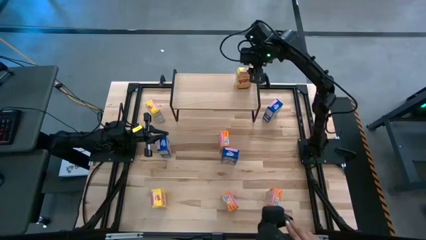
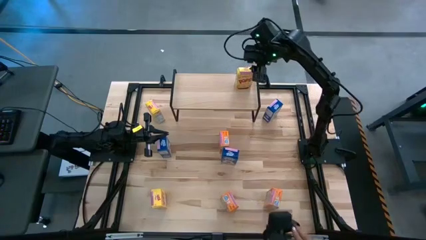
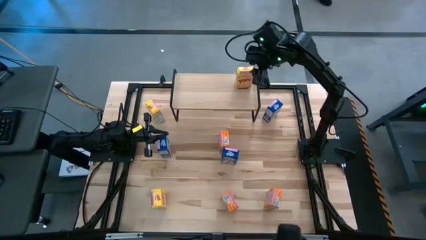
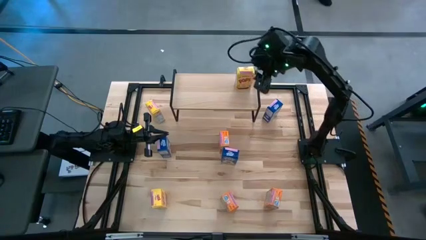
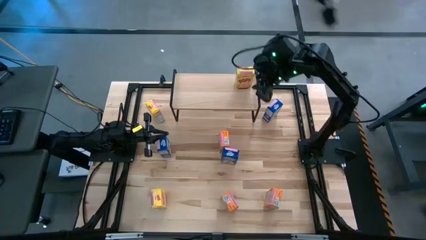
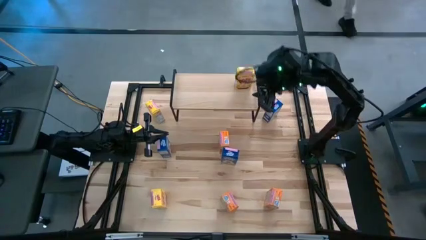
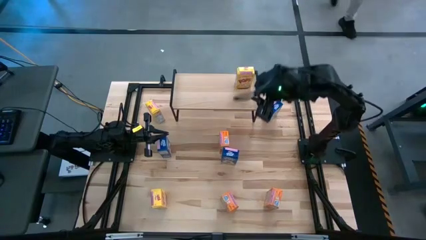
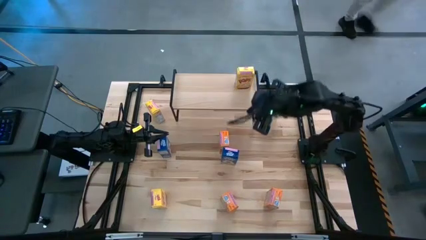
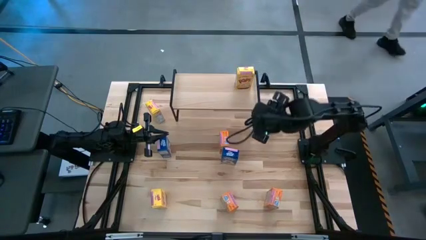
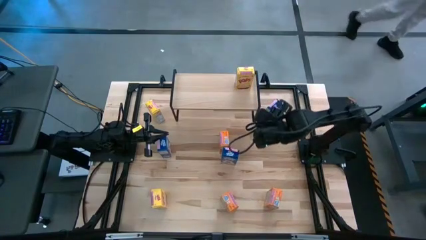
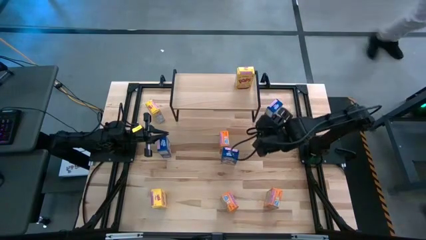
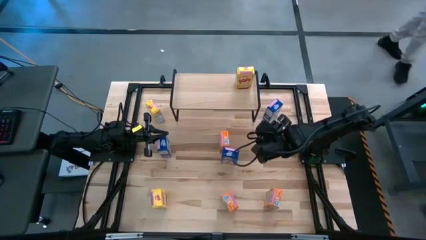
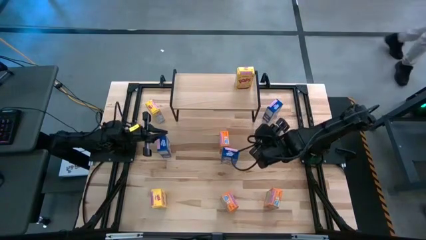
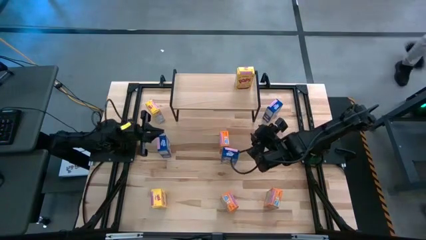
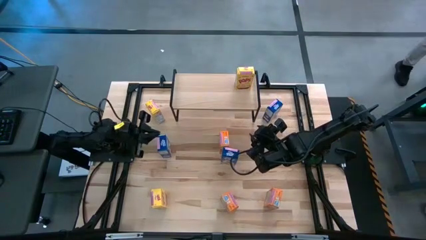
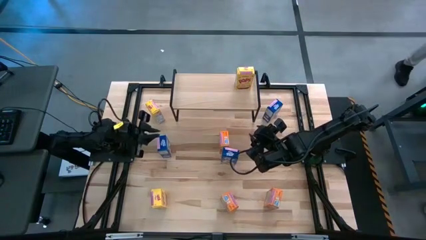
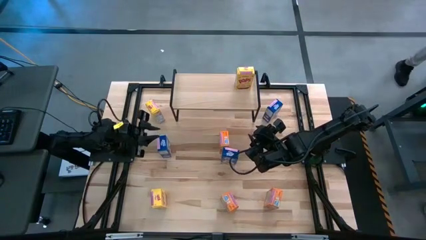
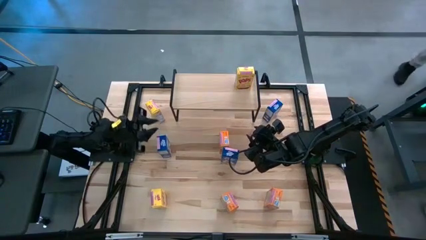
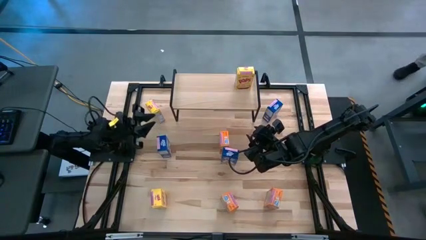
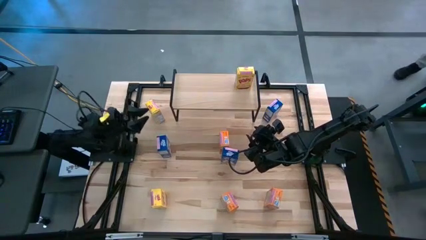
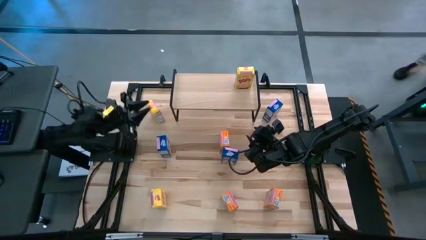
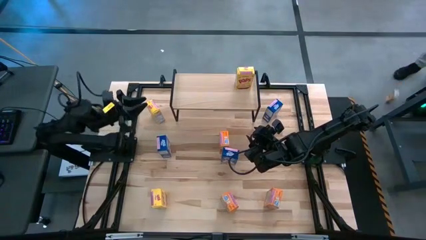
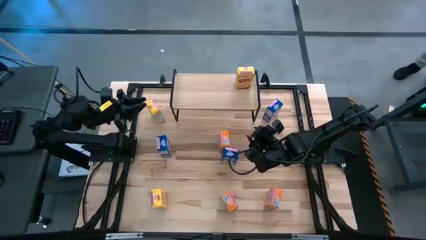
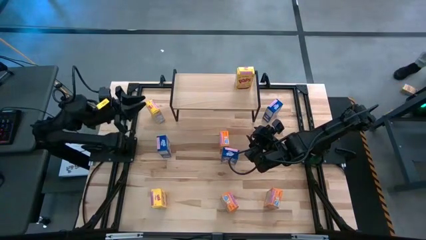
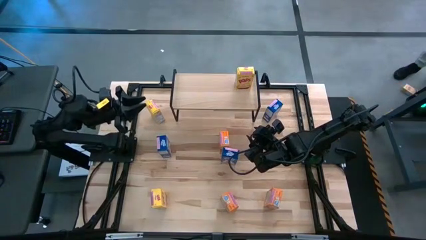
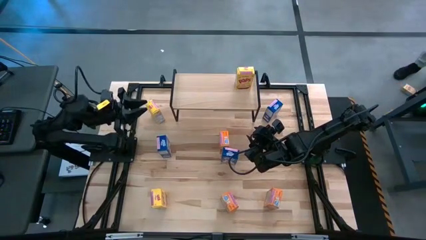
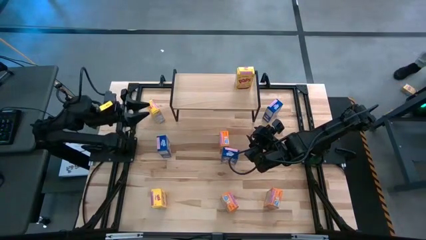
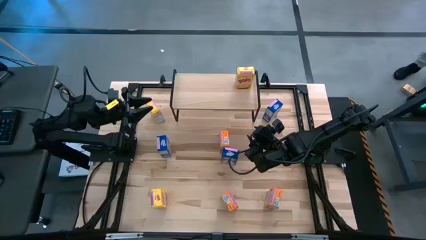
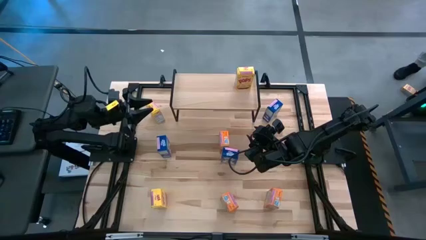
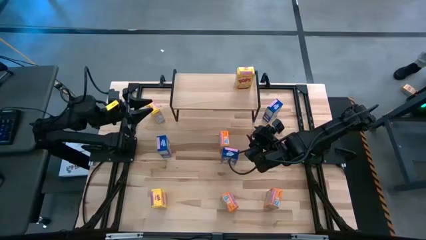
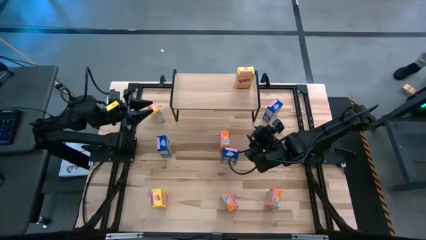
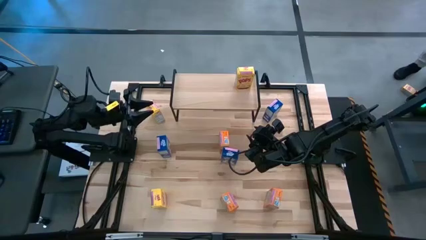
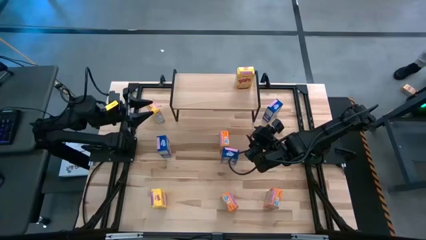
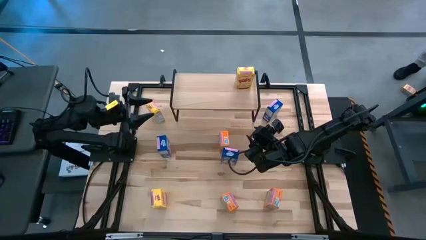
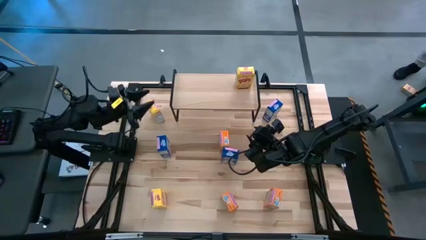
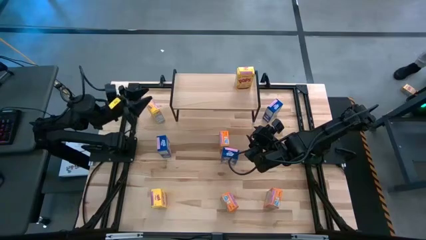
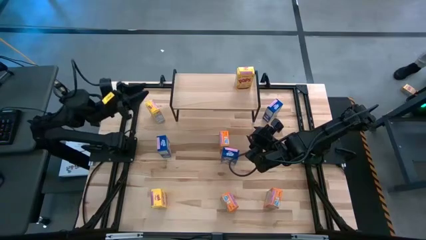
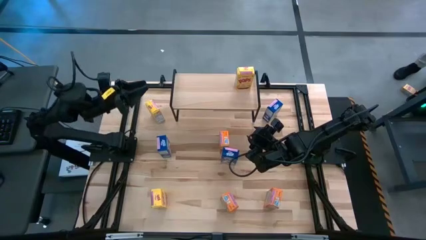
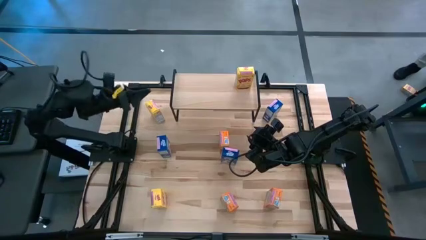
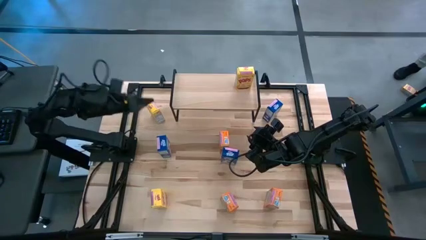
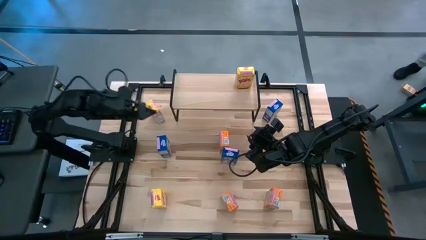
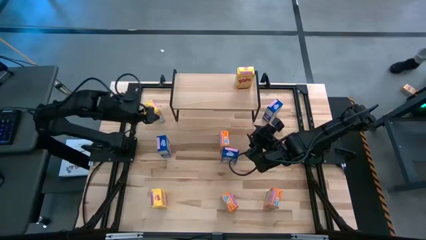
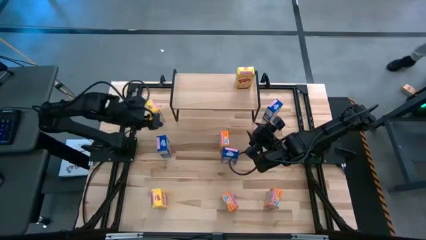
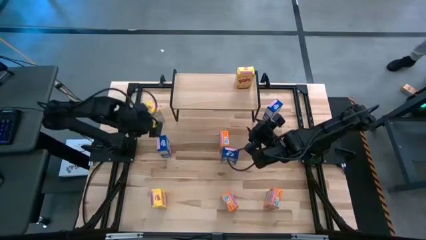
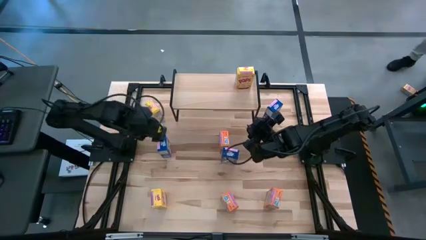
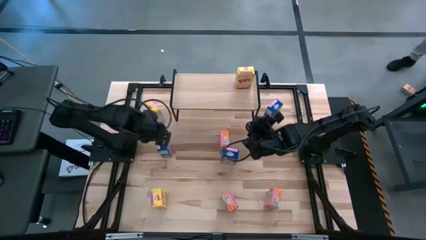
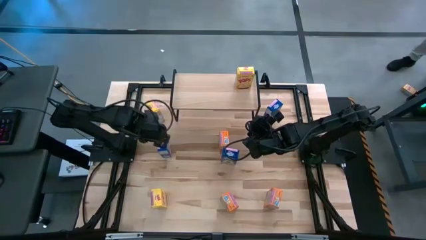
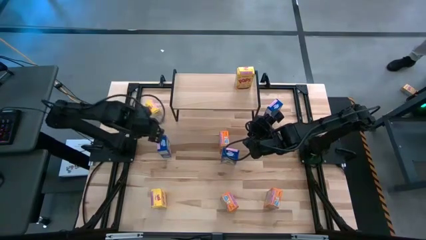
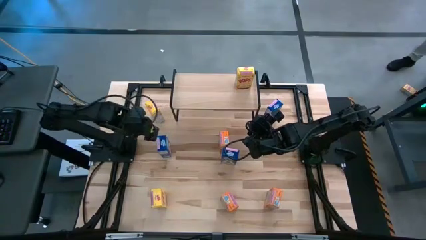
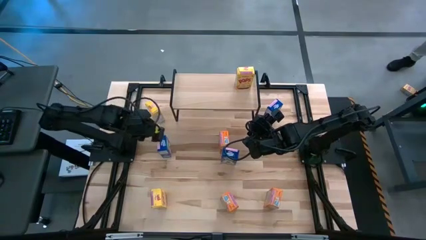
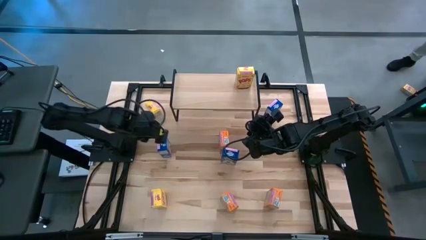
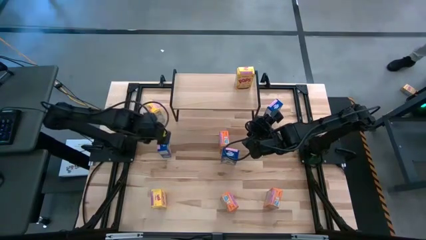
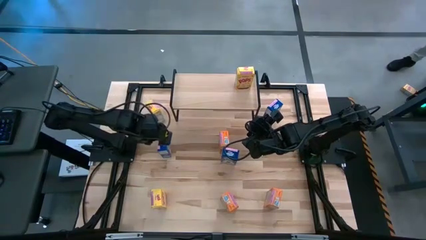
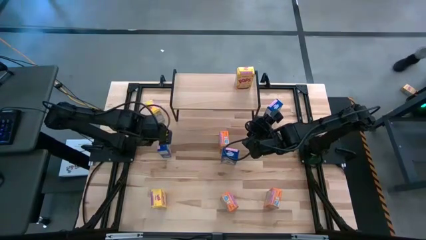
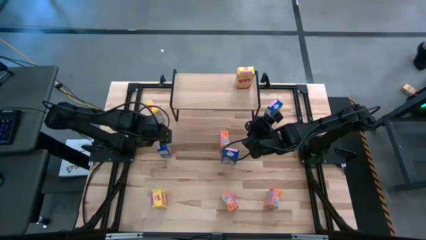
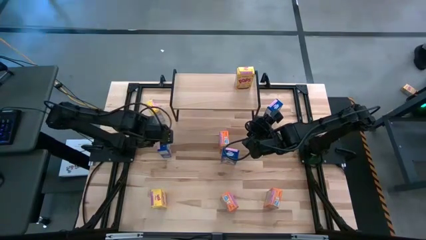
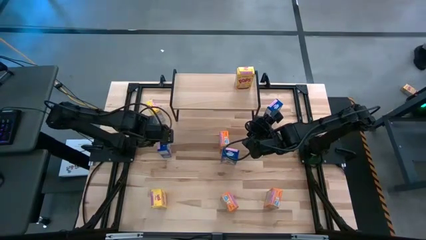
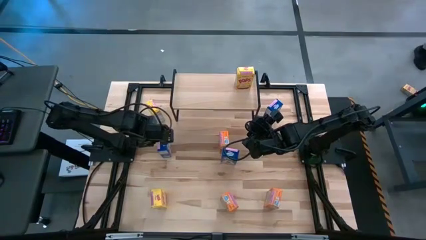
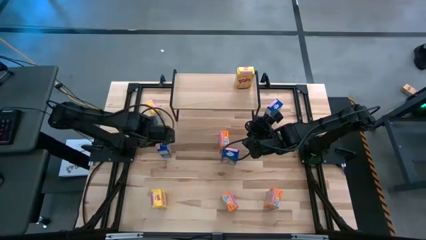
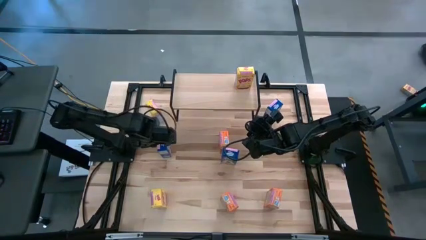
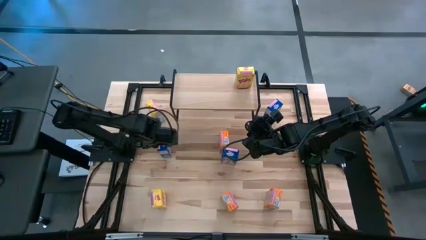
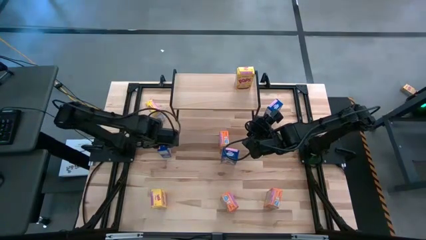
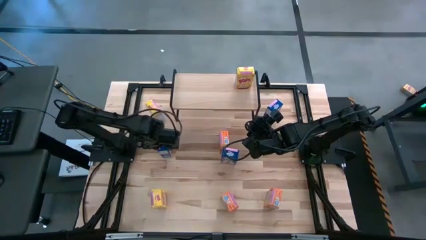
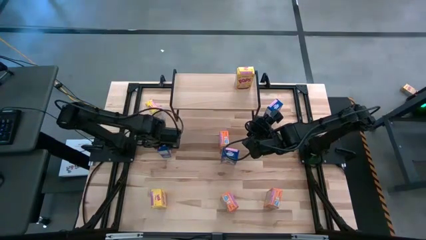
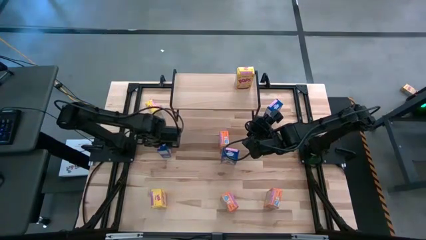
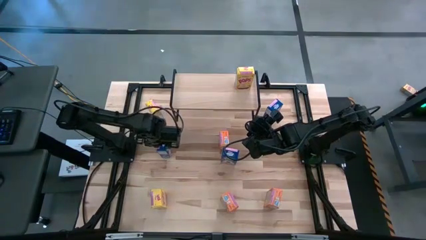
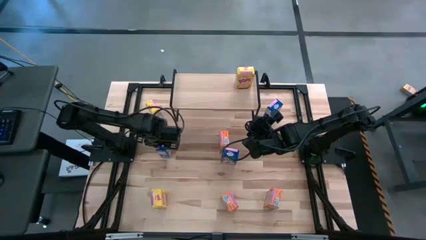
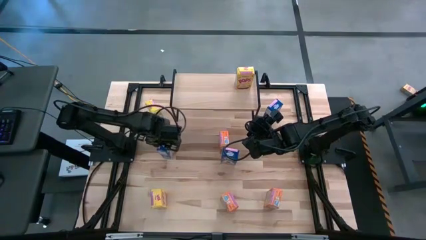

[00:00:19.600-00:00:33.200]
Task: Stack cereal on shelf
Put the bottom left blue cereal box on the shelf
